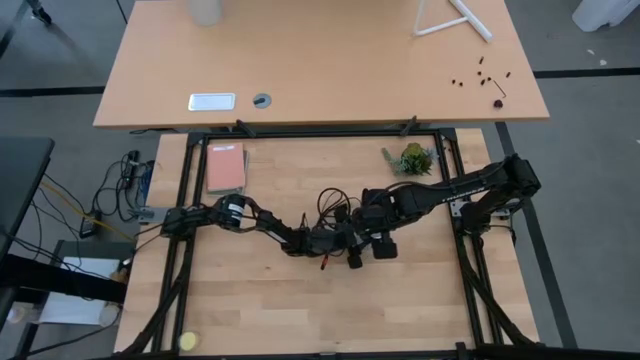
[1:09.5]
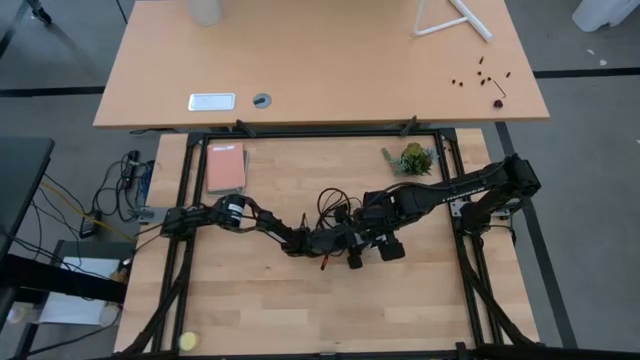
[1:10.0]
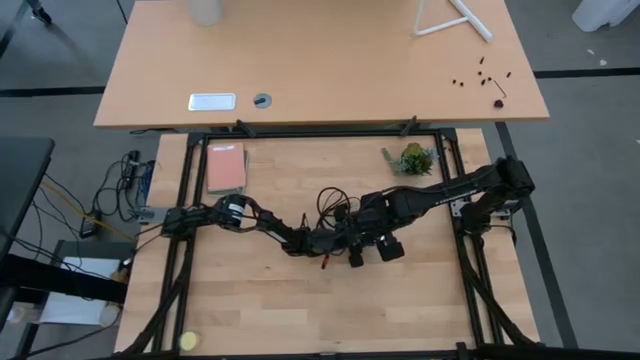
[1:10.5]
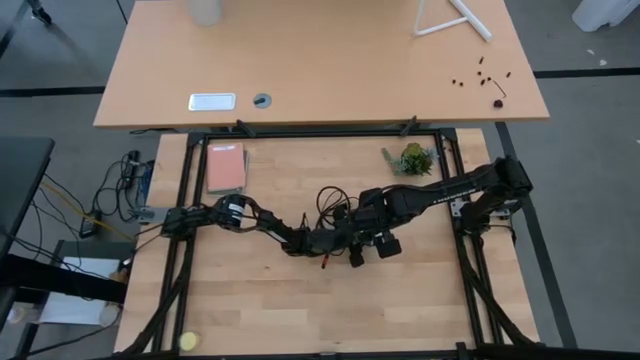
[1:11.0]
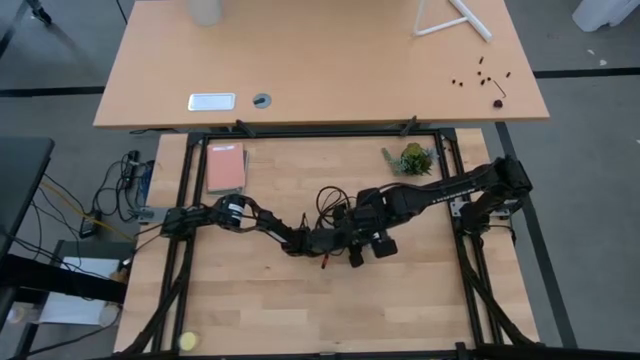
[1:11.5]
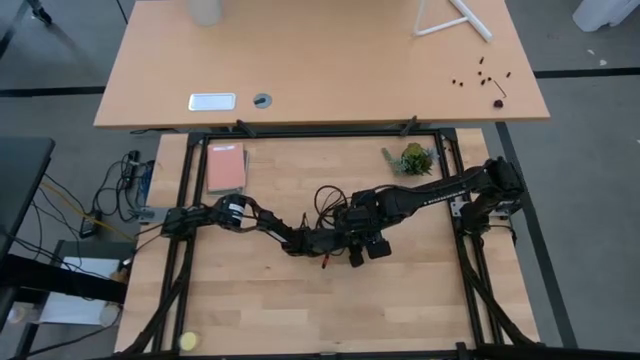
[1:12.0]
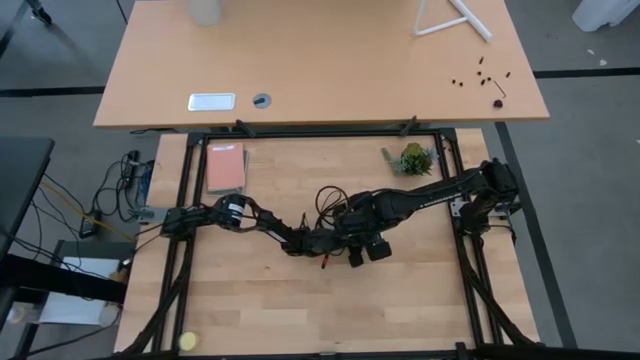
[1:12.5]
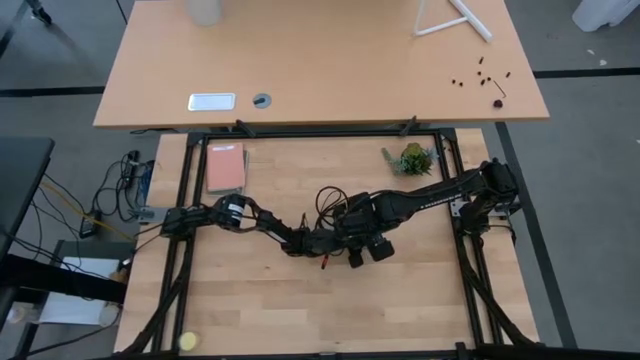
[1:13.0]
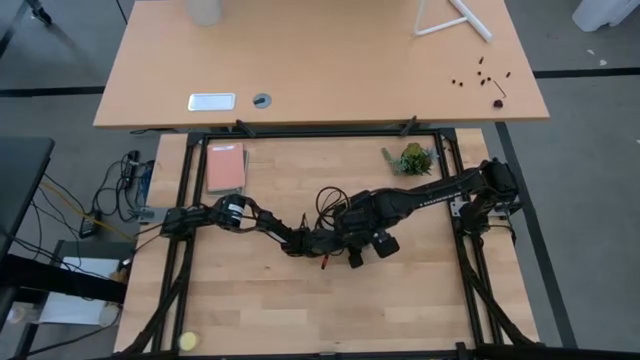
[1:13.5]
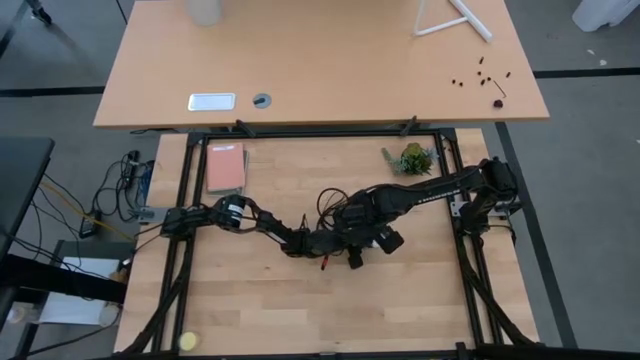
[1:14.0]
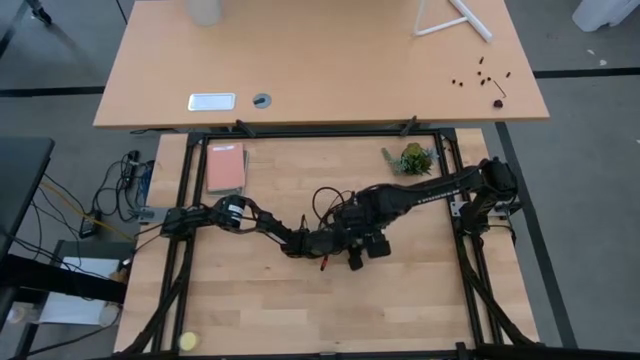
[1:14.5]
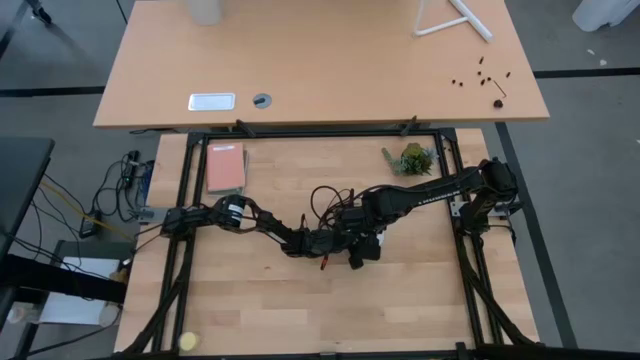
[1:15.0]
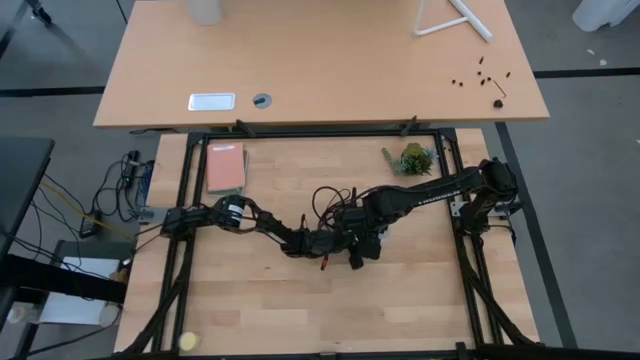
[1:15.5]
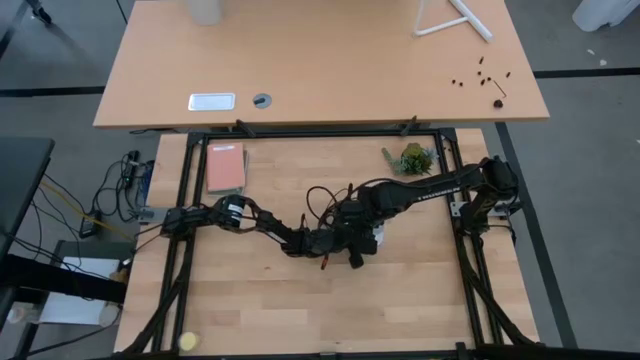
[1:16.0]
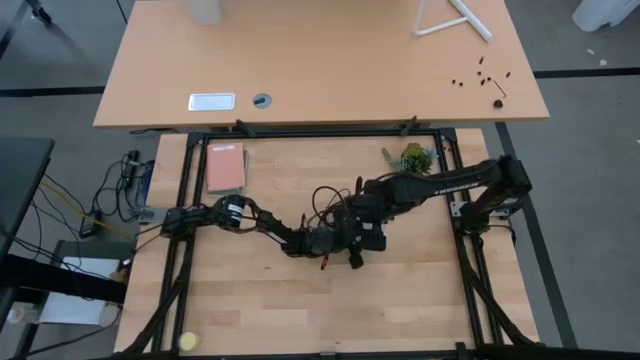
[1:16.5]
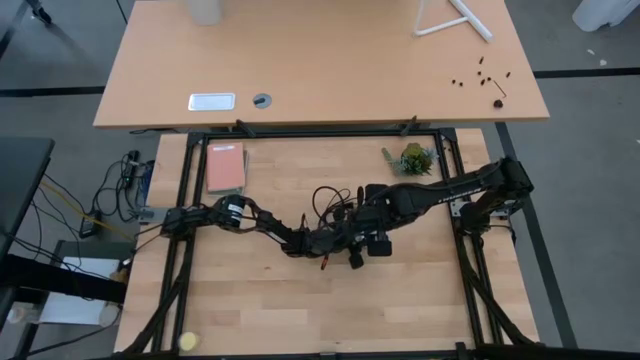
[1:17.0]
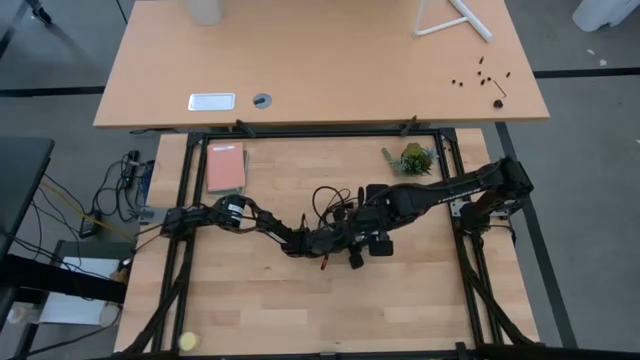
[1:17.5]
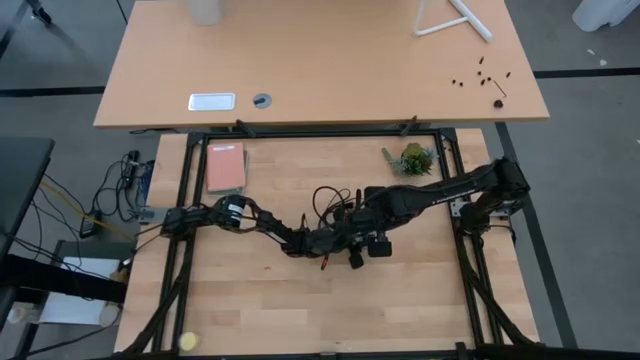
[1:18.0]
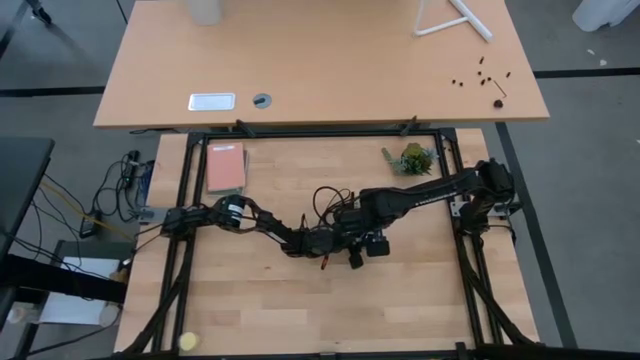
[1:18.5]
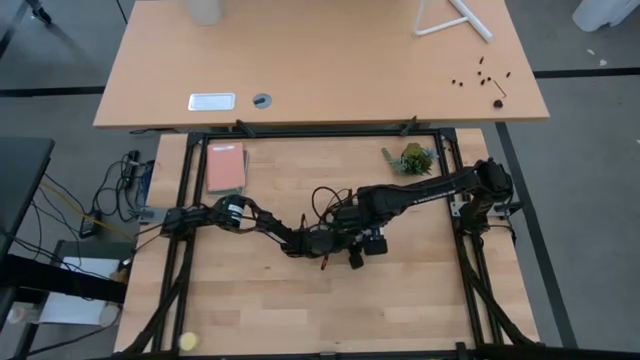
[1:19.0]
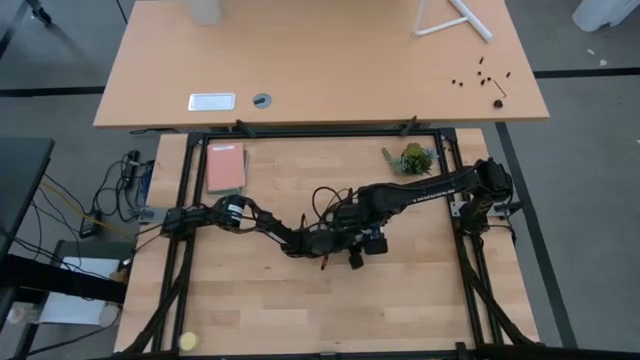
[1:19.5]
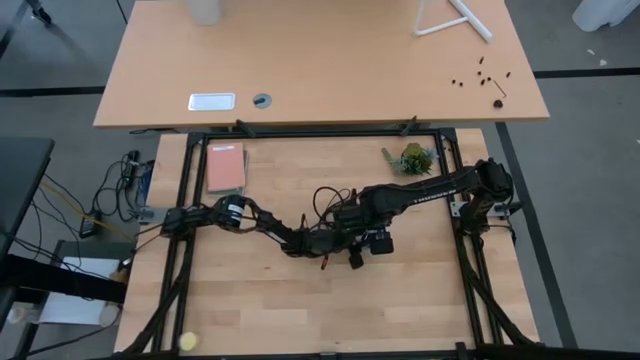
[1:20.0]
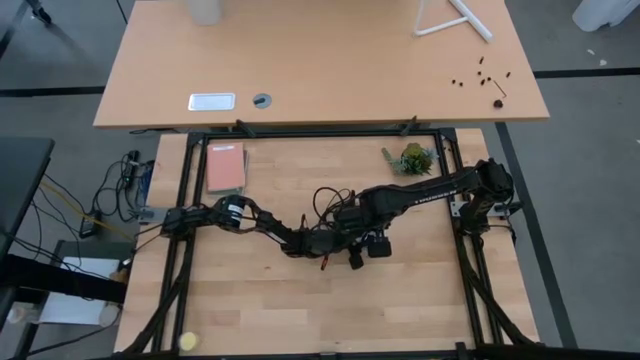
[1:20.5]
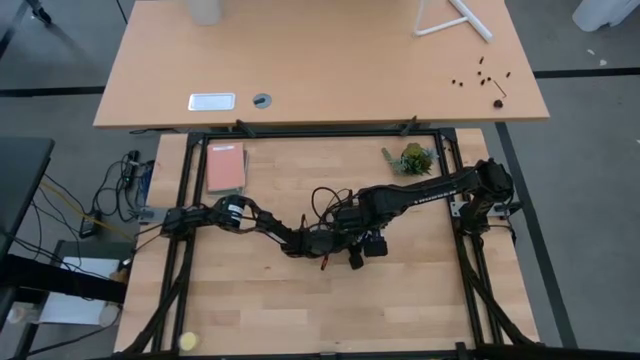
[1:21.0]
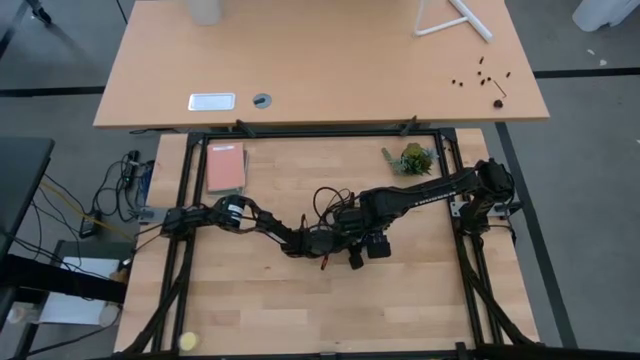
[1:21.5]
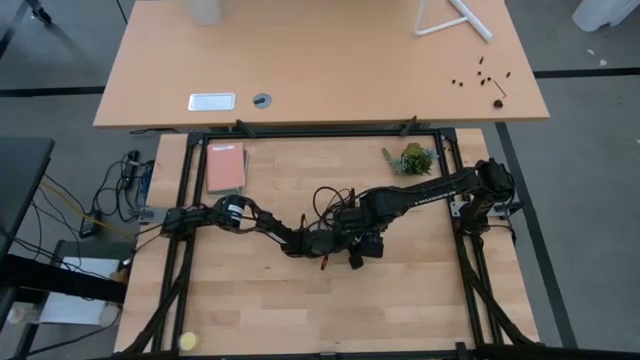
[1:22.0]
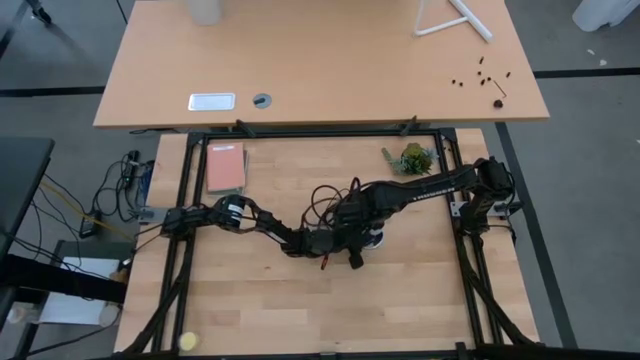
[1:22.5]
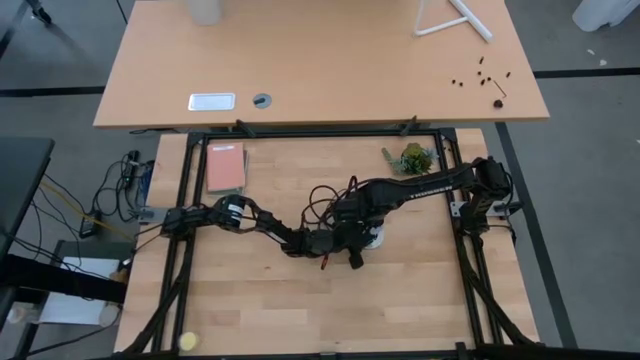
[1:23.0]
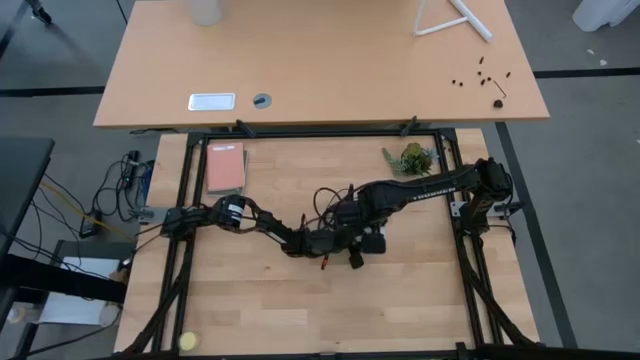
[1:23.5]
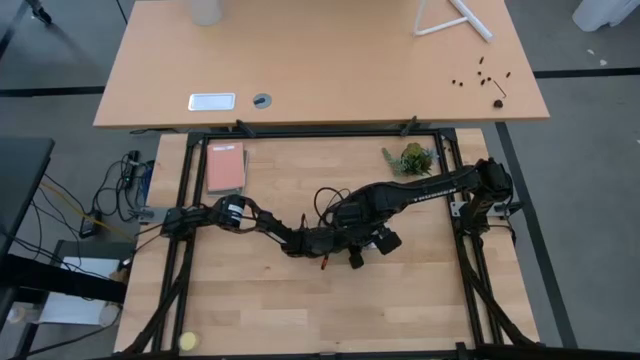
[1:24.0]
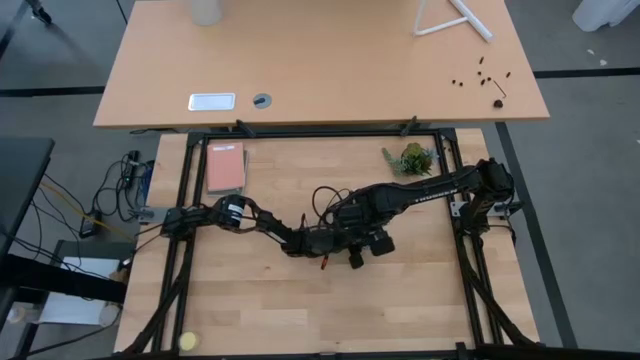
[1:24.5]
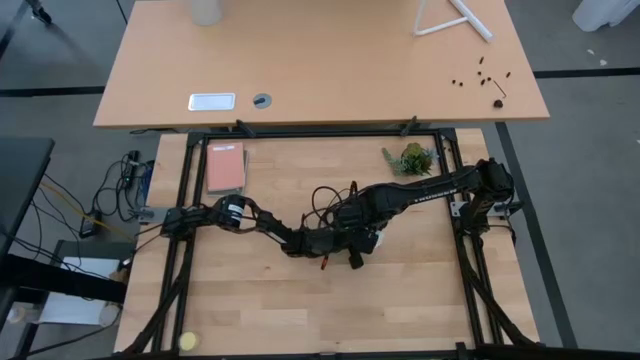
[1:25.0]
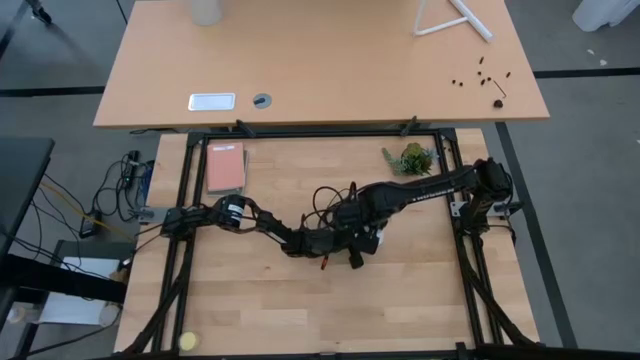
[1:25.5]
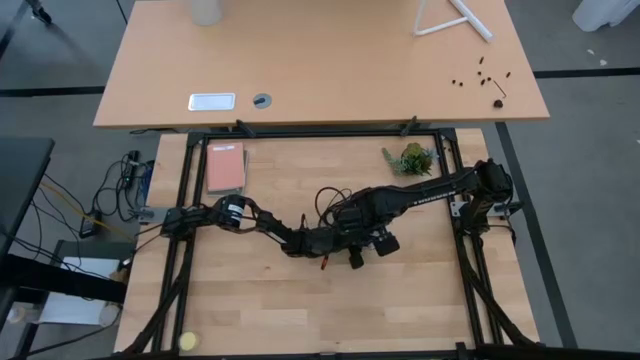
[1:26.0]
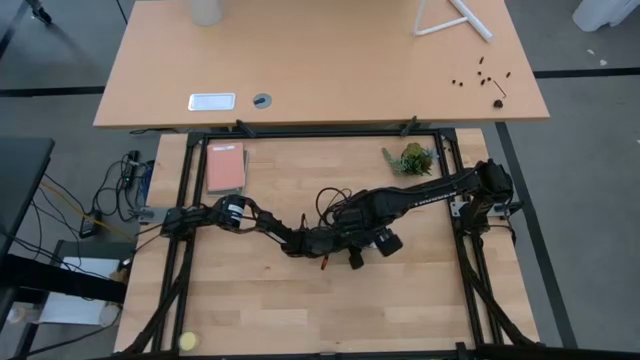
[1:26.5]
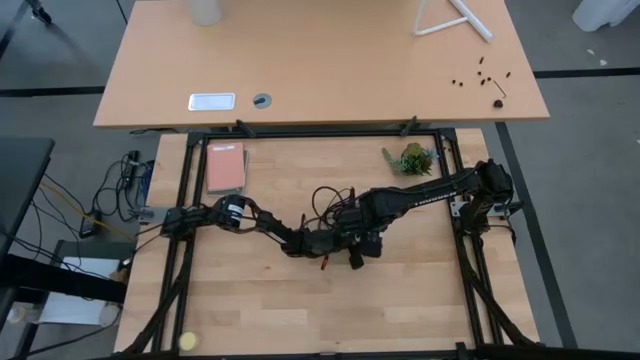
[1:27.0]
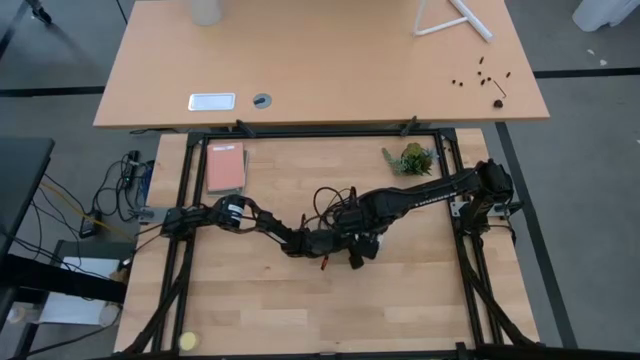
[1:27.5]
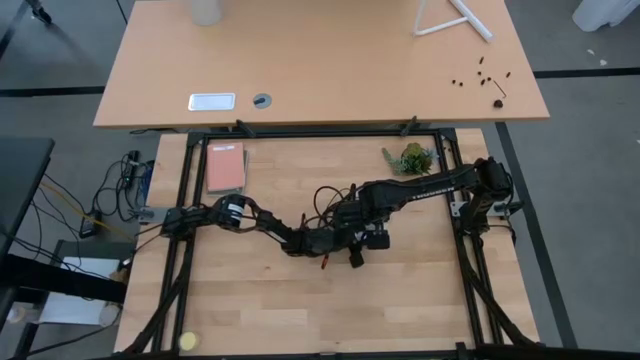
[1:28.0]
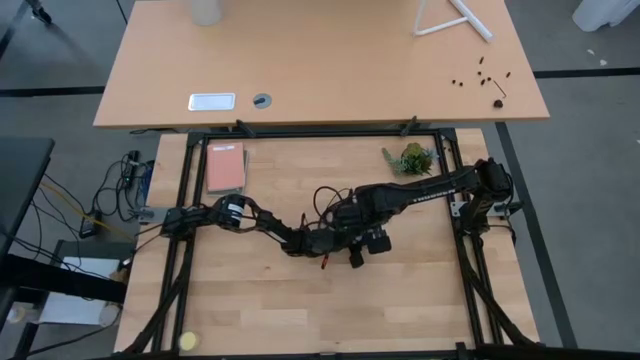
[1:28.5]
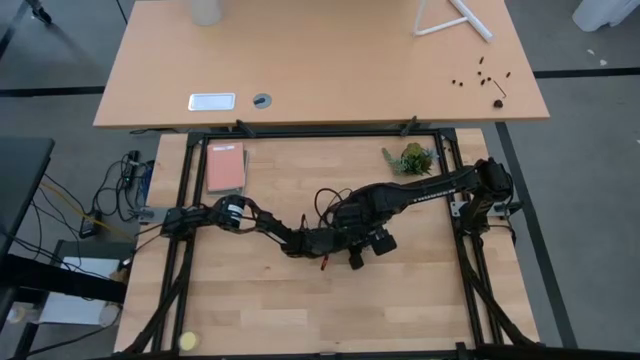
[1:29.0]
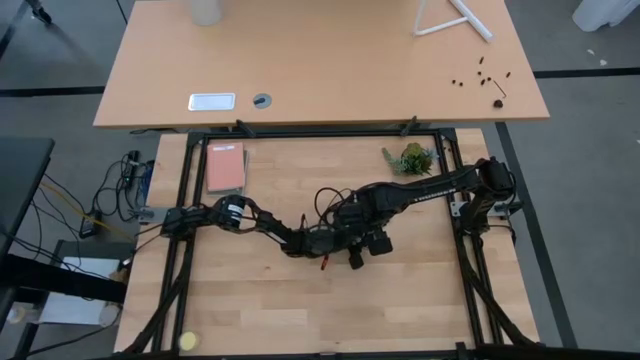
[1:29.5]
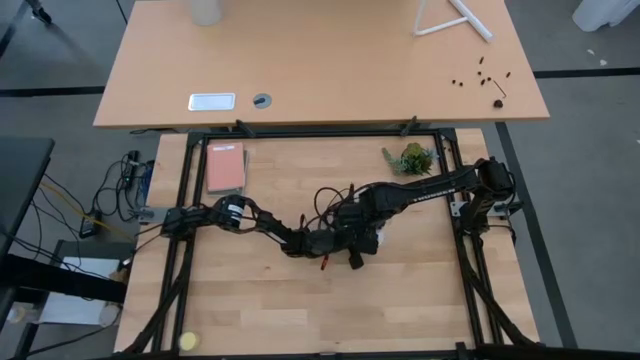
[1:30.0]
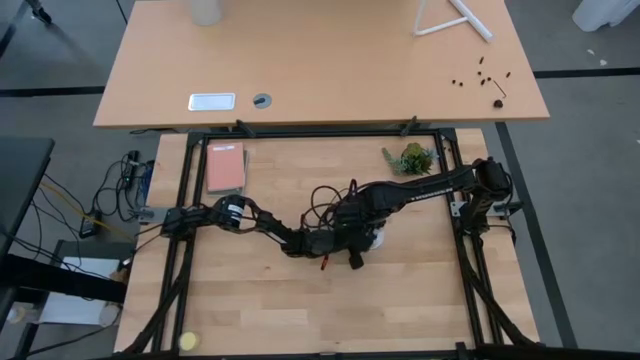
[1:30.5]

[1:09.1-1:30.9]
Task: Screw lightbulb
Insert the lightbulb into the lamp
